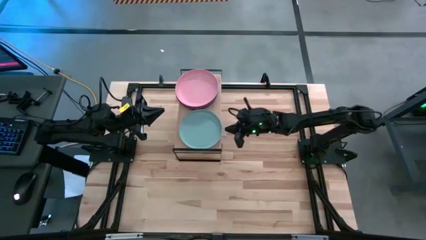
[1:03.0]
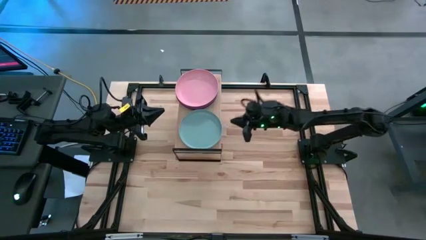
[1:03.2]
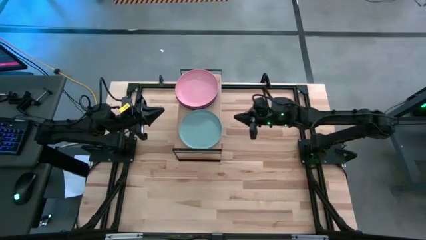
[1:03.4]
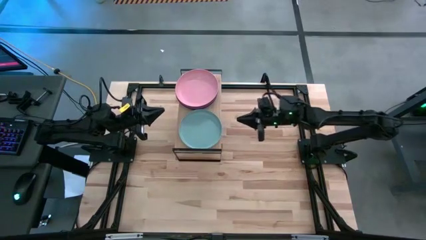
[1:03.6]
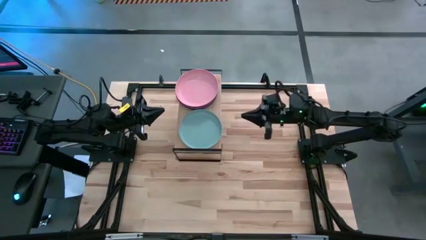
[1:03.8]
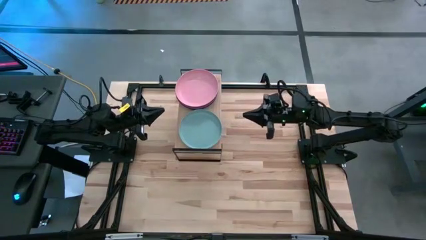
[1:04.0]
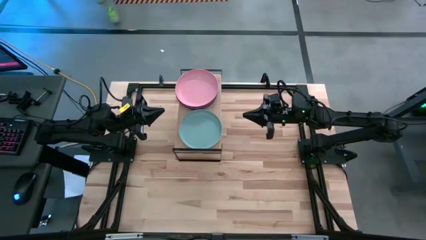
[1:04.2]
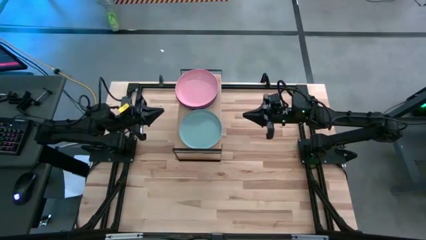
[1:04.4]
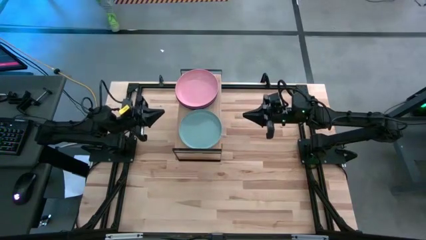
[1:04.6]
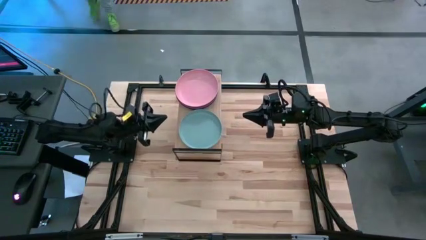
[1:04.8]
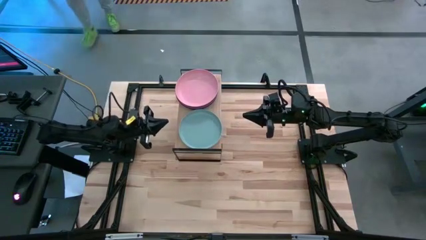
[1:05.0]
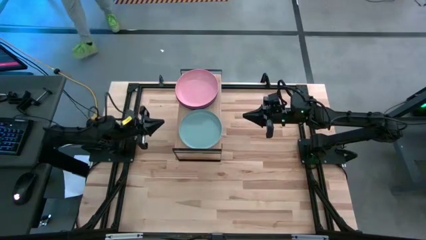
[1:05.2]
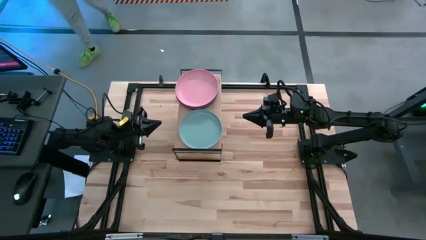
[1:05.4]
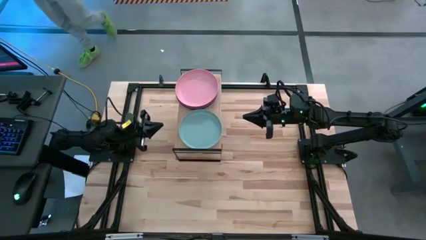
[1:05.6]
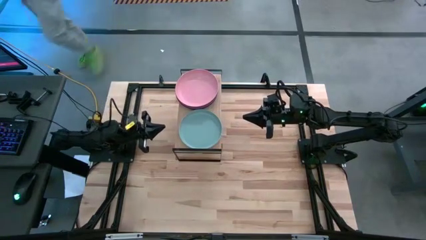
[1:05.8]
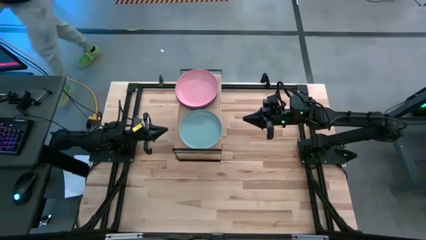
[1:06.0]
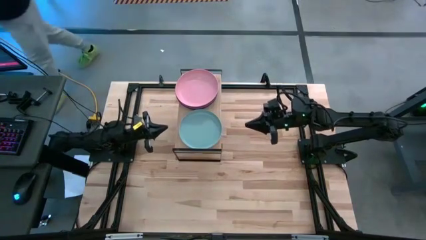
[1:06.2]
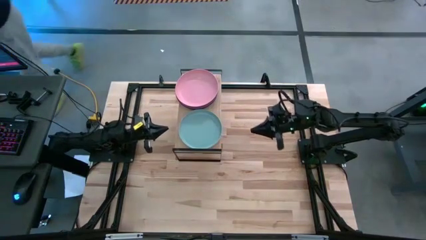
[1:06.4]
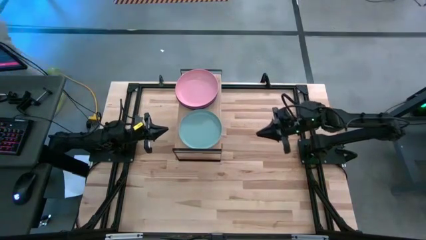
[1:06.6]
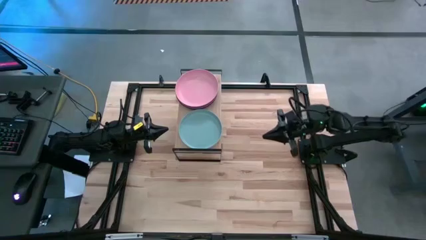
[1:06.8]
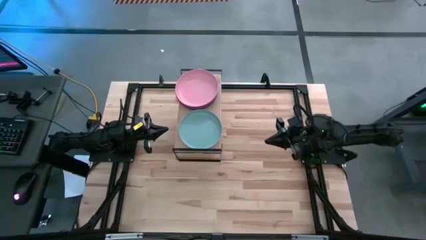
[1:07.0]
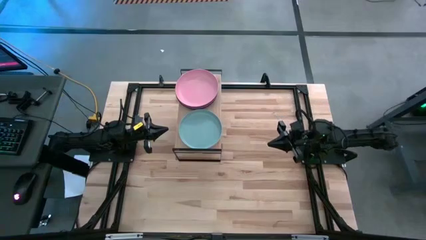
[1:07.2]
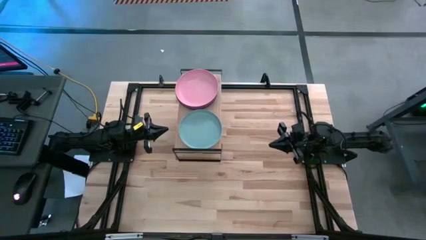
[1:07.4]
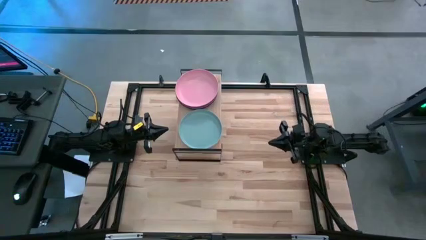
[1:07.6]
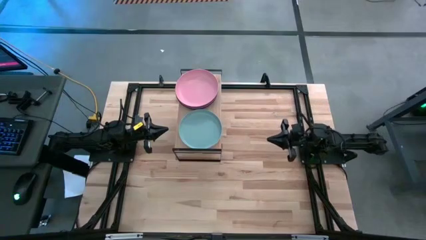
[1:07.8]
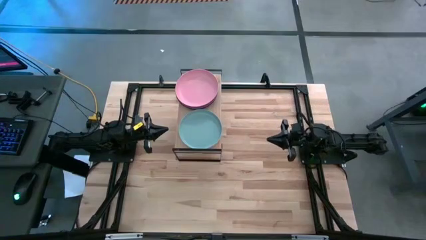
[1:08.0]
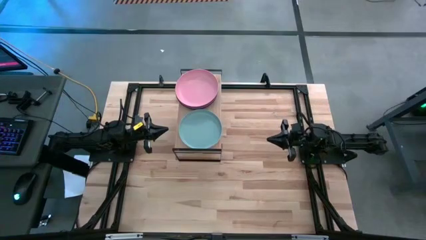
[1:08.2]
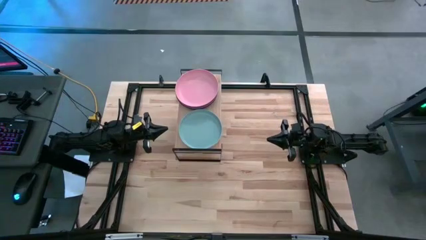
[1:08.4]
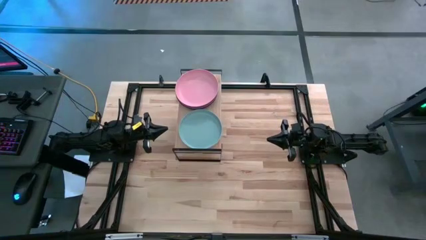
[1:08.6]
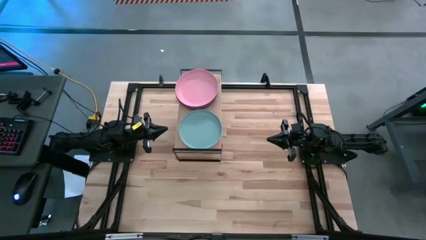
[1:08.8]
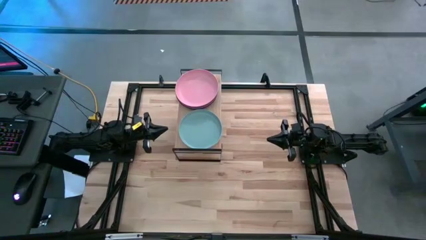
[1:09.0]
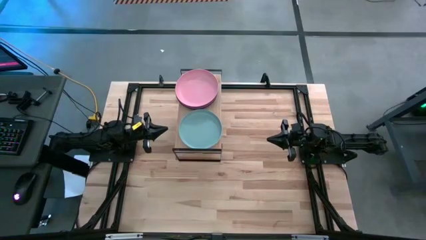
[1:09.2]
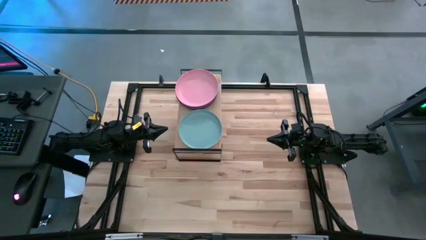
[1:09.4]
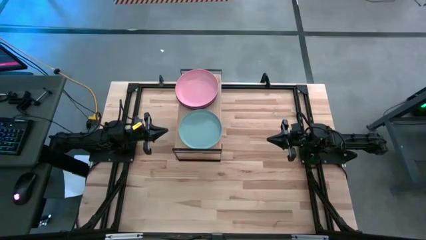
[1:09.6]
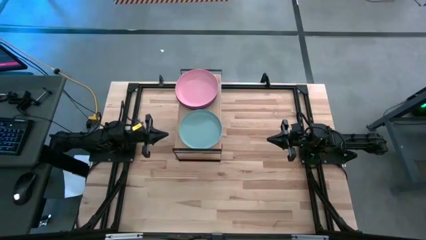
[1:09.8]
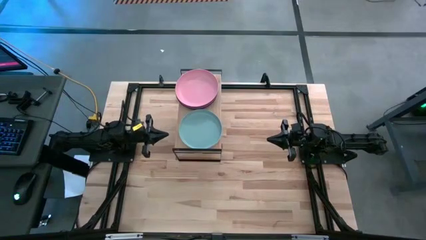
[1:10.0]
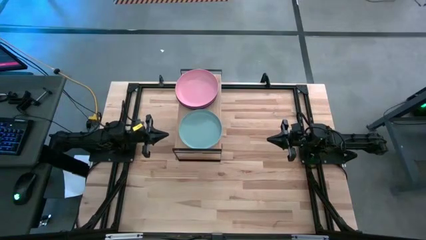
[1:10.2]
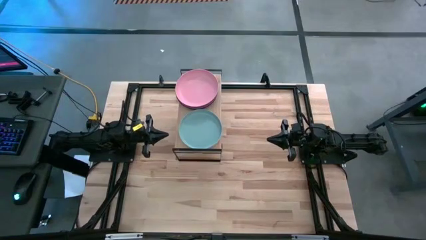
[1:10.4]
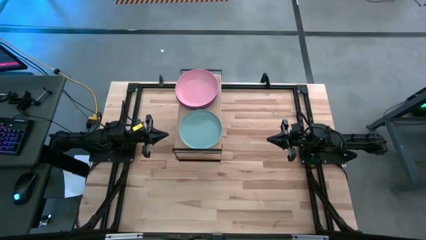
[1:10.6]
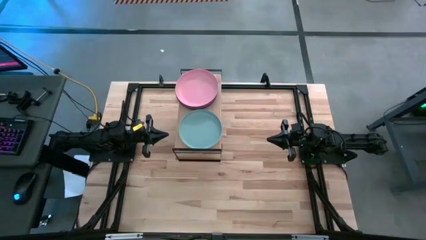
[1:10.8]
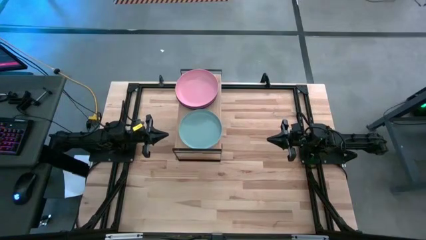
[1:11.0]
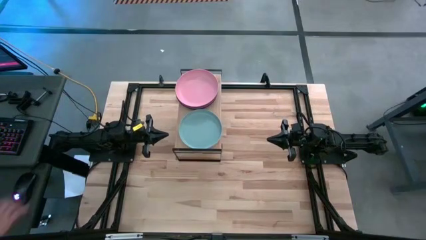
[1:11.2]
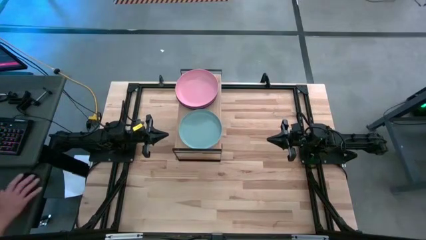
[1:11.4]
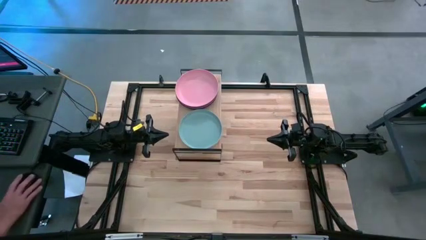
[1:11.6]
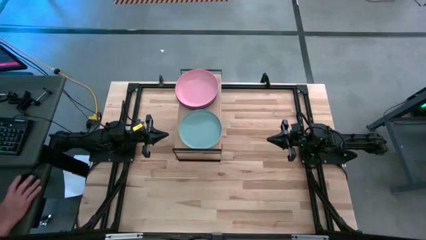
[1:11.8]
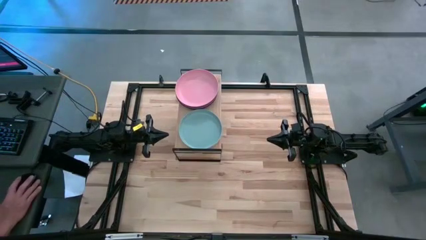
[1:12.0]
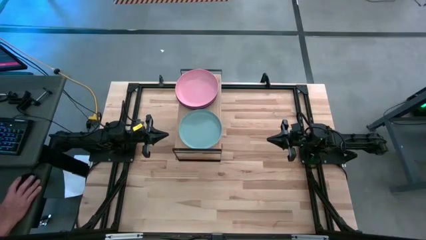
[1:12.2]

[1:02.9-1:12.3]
Task: Place and stack plates onto a shelf
Return to Home Position

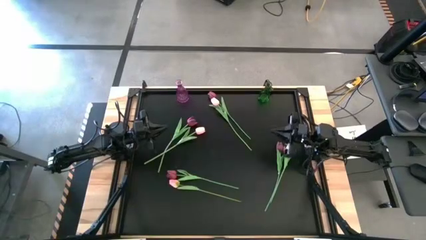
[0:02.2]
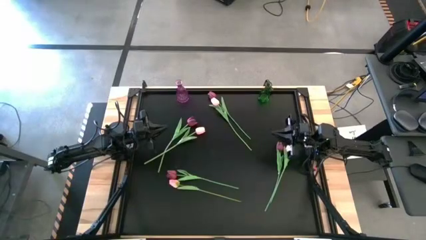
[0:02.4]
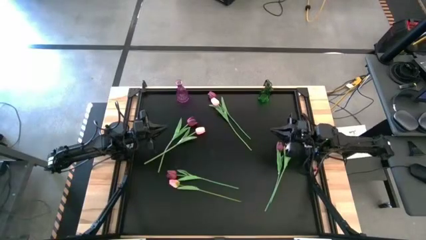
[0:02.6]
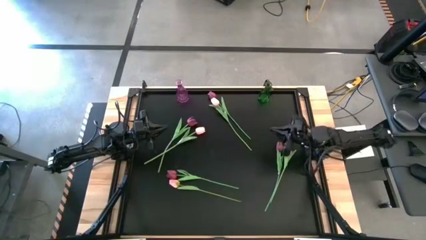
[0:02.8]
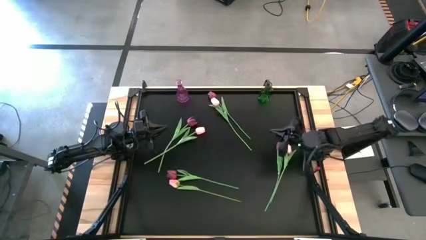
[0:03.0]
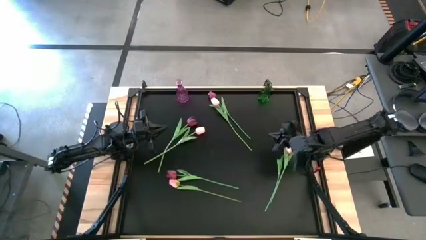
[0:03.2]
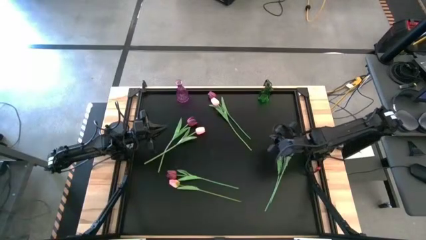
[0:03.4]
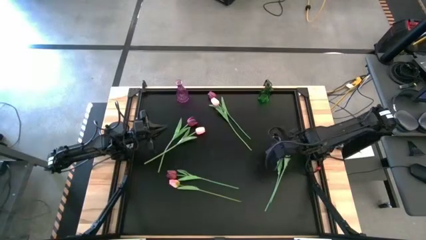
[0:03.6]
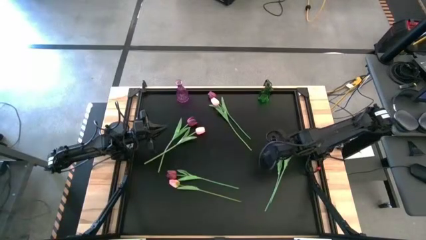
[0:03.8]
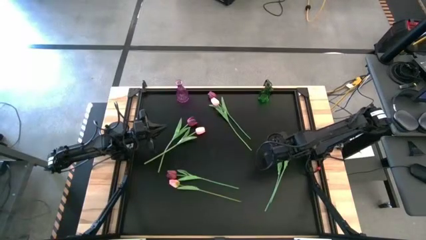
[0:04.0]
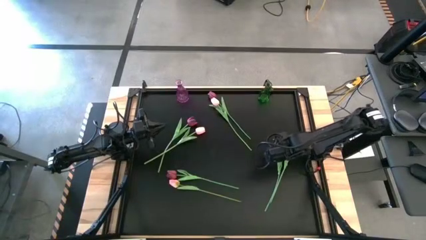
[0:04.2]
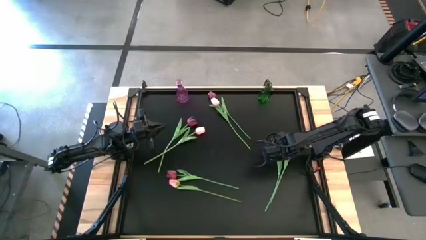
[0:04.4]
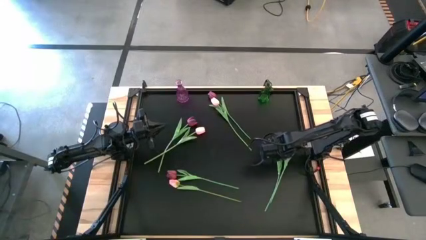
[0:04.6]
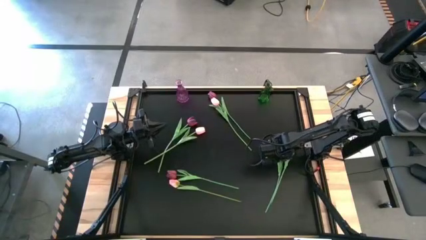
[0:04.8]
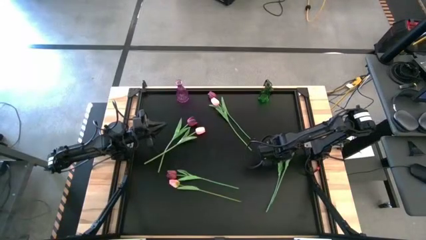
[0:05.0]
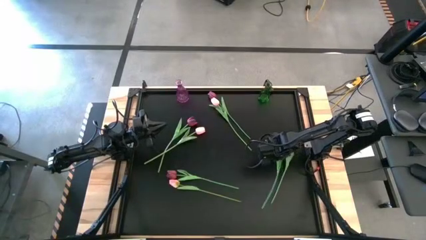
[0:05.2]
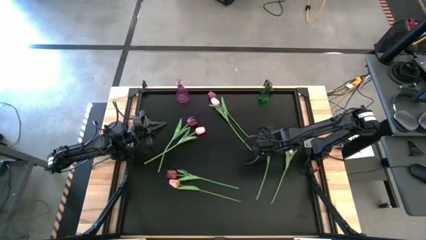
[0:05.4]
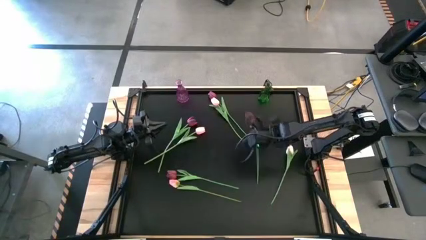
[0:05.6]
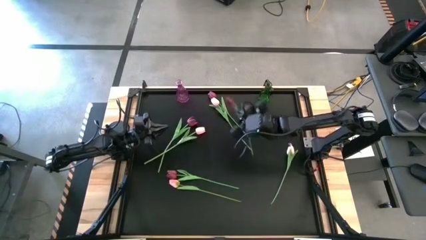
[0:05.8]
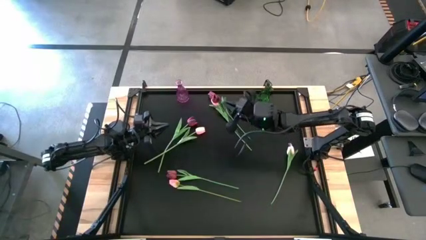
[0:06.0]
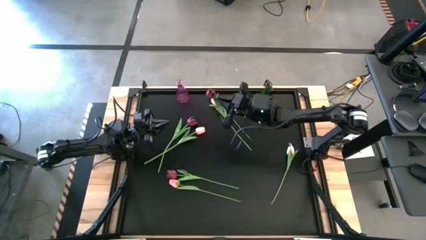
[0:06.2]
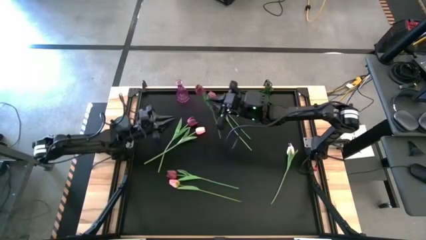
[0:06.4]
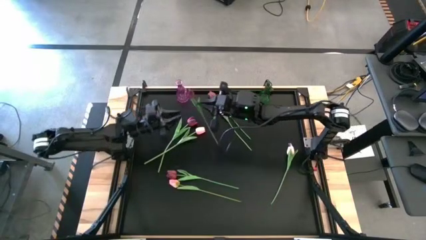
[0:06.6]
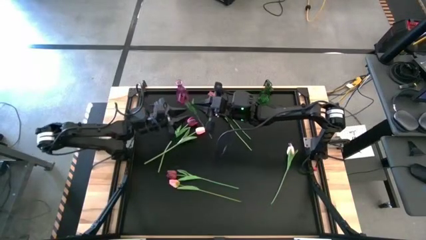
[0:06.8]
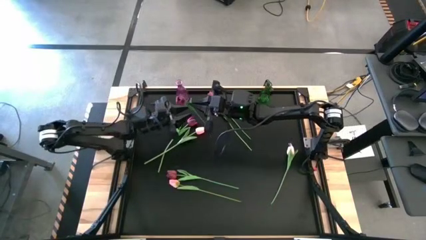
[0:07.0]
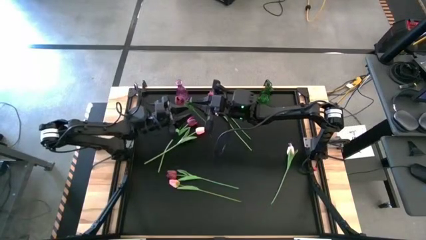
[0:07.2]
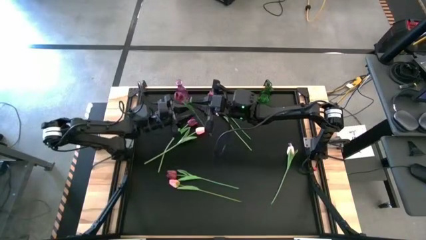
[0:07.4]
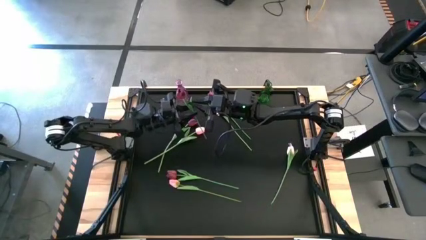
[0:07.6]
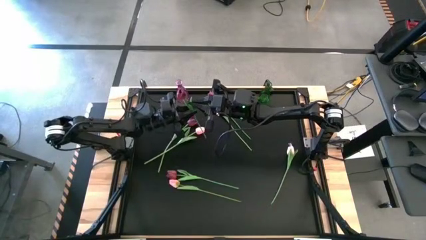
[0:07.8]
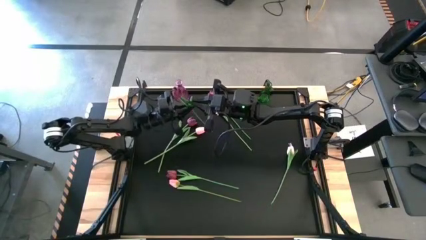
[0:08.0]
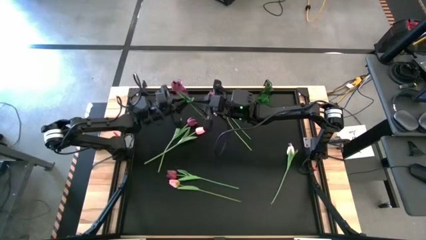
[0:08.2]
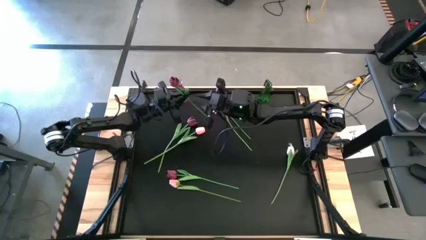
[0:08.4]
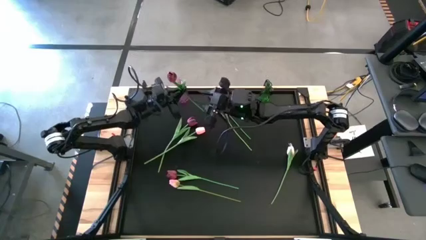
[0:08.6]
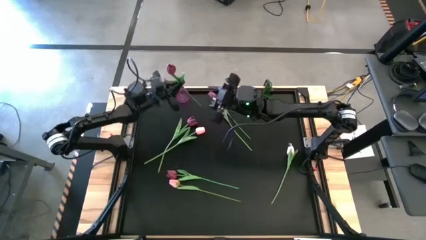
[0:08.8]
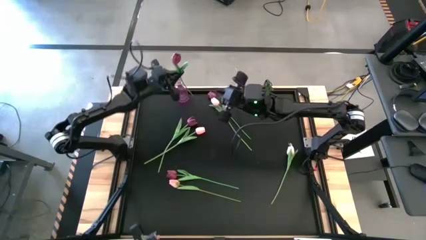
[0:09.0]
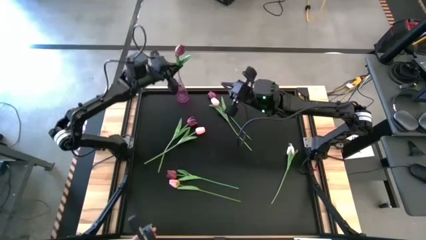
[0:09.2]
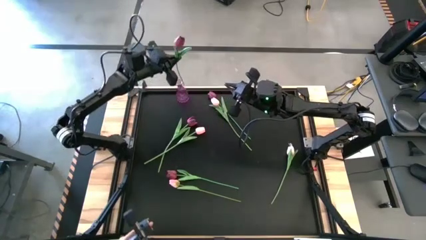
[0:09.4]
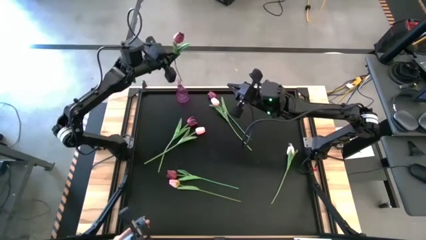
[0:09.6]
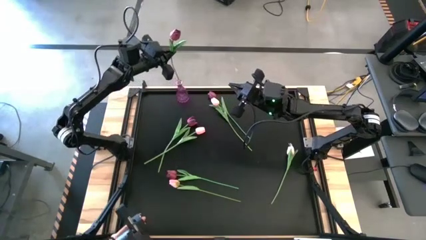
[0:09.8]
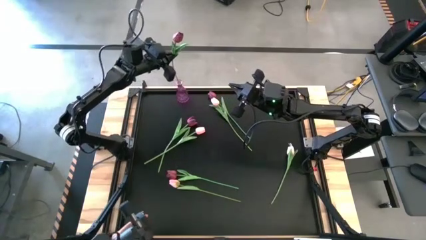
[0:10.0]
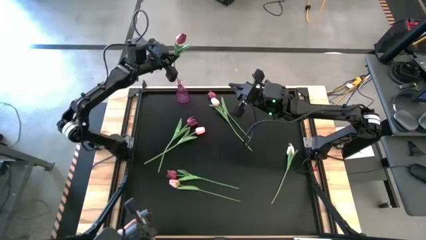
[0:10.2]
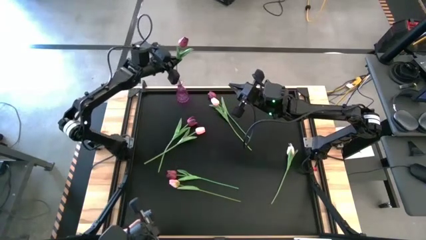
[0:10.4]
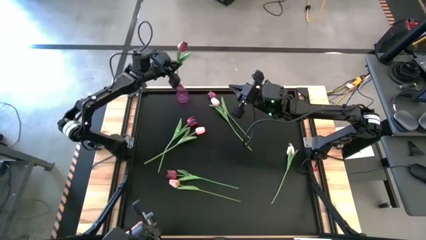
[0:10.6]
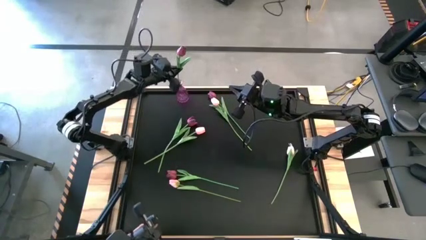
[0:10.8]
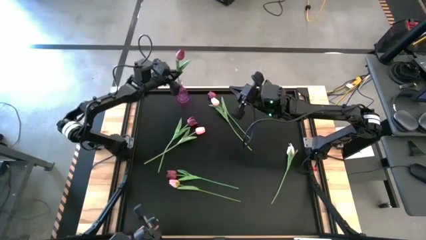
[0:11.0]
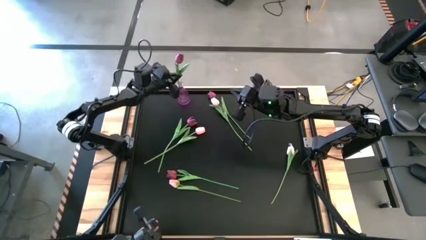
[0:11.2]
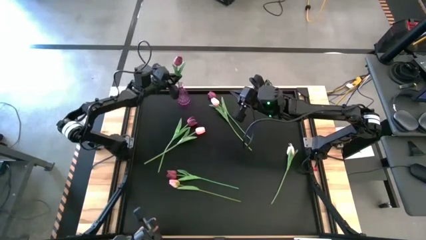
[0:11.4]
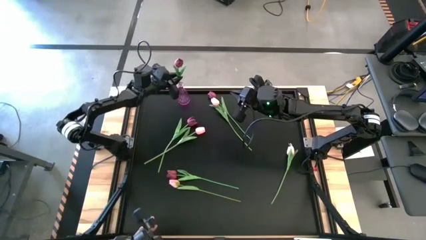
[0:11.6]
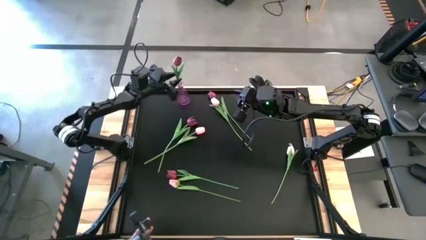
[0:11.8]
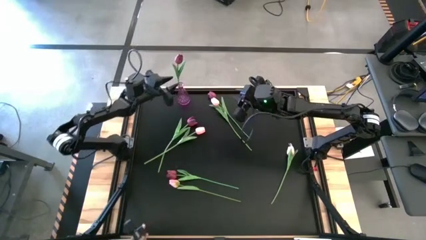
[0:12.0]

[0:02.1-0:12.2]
Task: Sort flowers into vase by color
Put the middle right red flower into the purple vase
